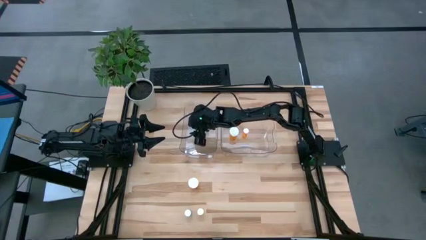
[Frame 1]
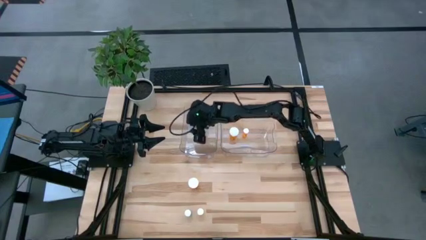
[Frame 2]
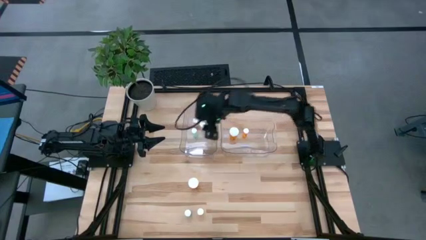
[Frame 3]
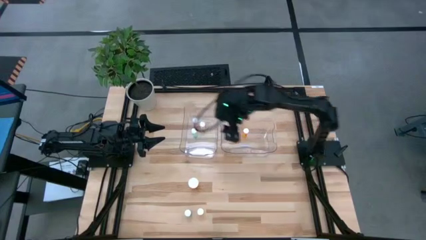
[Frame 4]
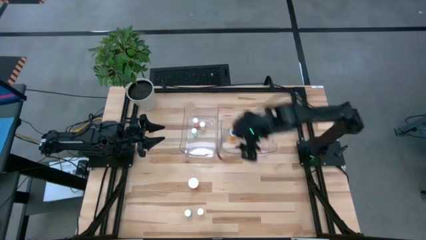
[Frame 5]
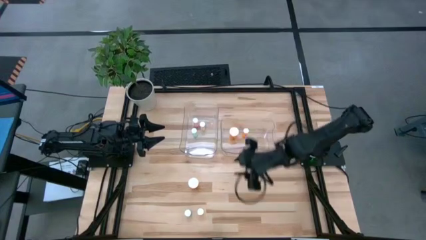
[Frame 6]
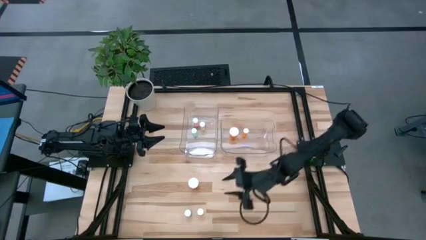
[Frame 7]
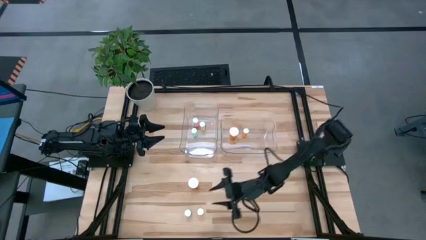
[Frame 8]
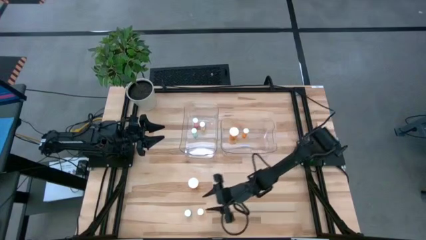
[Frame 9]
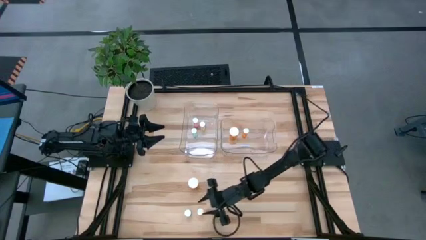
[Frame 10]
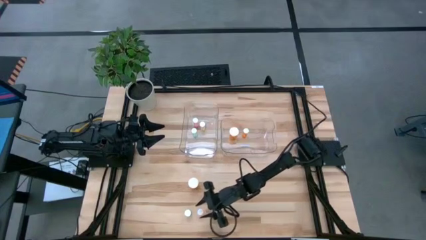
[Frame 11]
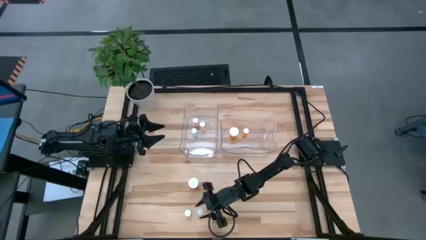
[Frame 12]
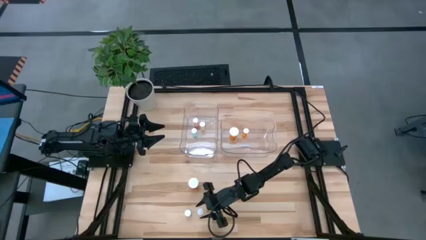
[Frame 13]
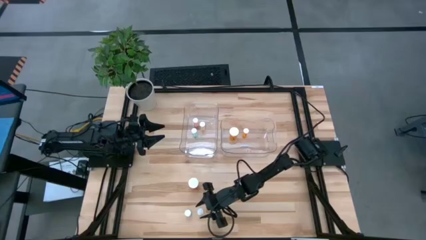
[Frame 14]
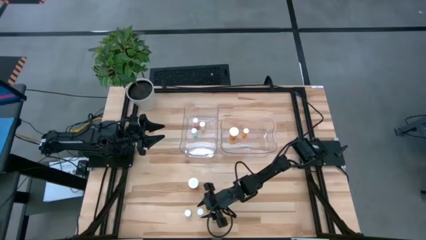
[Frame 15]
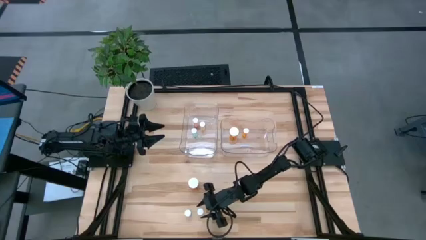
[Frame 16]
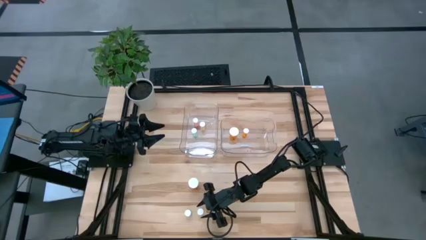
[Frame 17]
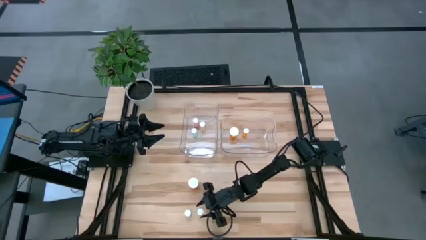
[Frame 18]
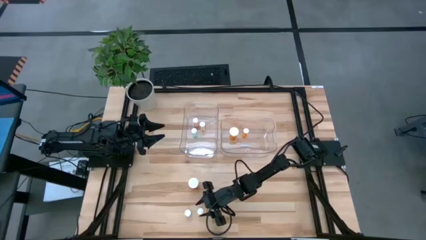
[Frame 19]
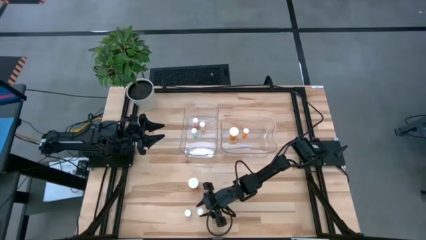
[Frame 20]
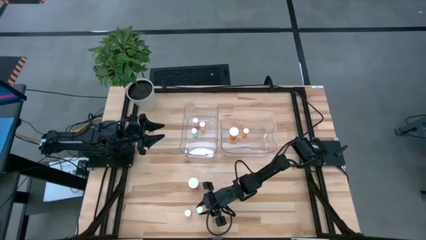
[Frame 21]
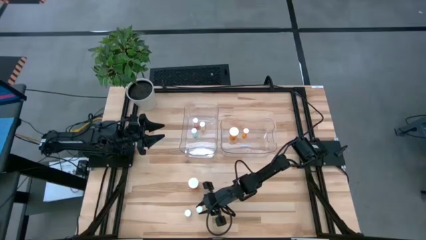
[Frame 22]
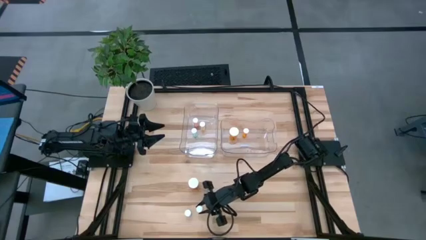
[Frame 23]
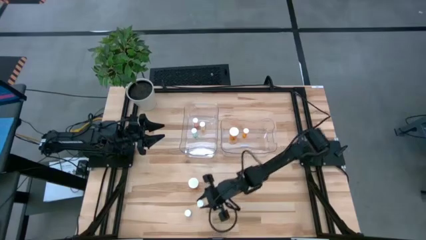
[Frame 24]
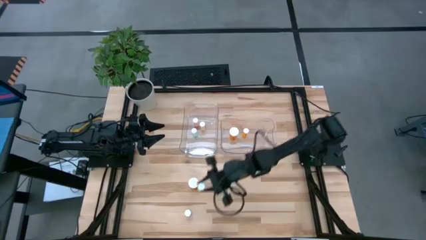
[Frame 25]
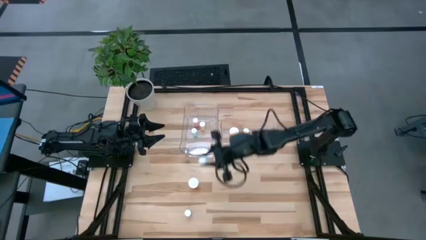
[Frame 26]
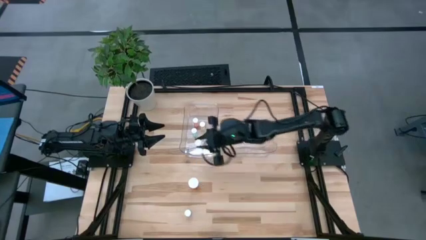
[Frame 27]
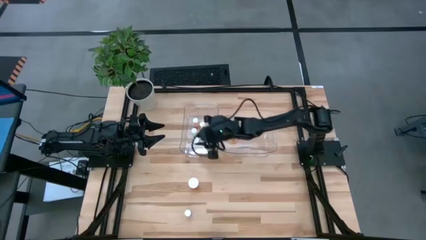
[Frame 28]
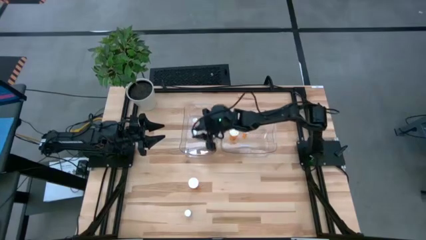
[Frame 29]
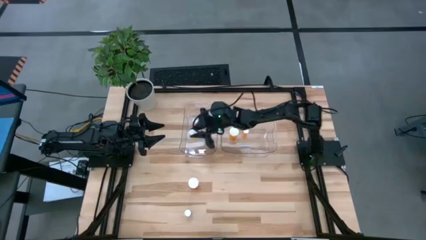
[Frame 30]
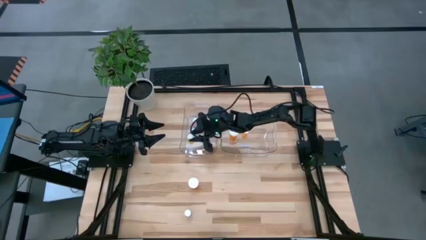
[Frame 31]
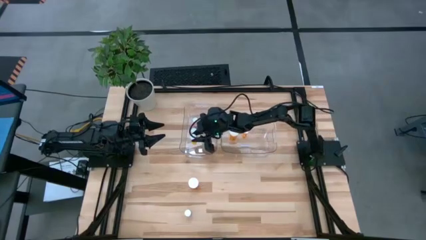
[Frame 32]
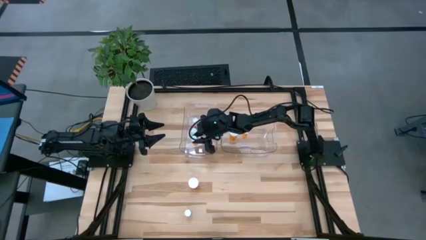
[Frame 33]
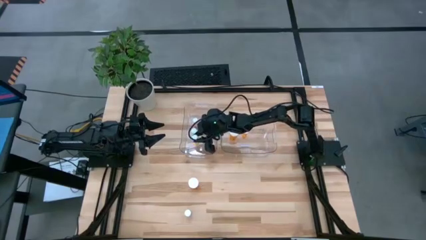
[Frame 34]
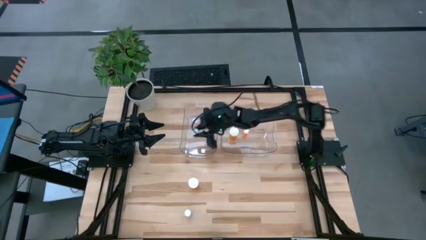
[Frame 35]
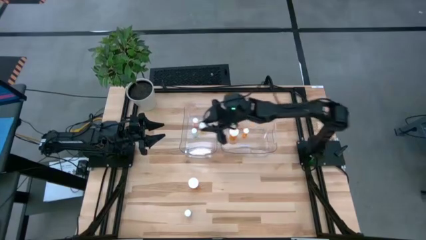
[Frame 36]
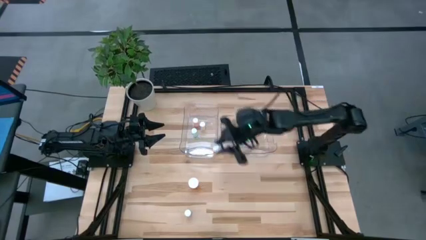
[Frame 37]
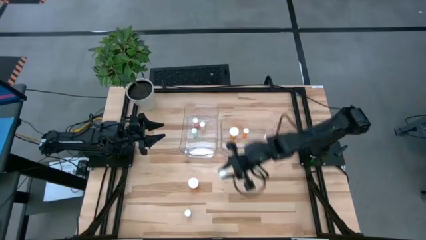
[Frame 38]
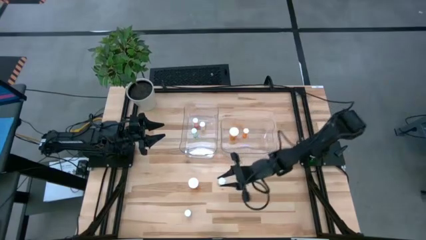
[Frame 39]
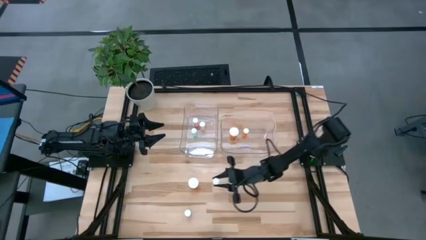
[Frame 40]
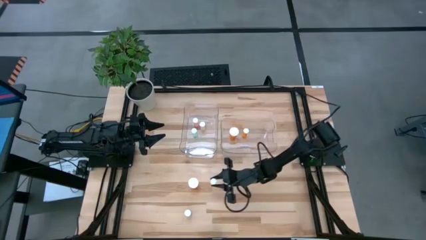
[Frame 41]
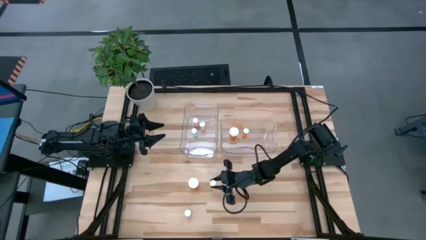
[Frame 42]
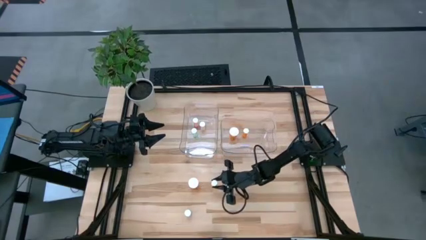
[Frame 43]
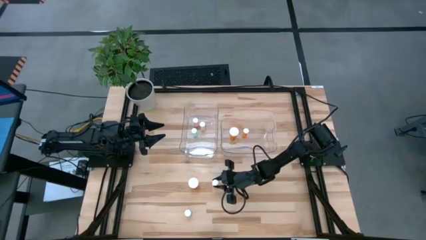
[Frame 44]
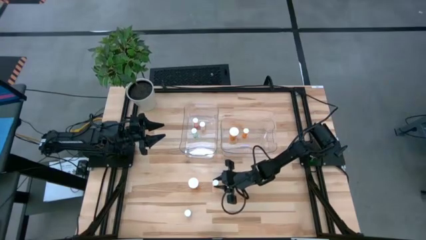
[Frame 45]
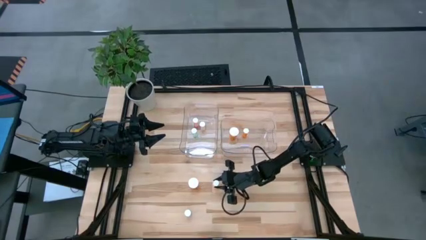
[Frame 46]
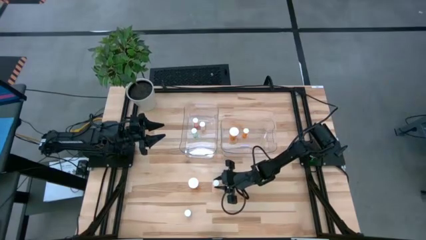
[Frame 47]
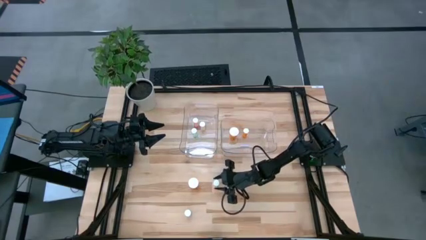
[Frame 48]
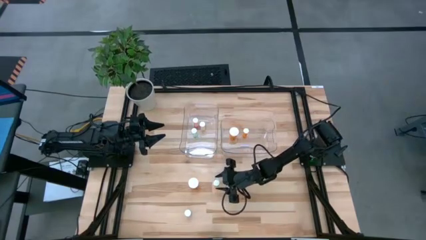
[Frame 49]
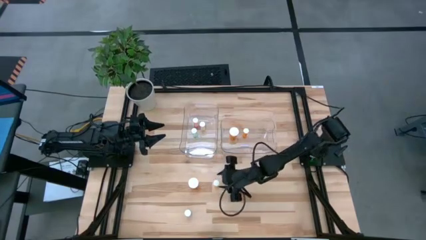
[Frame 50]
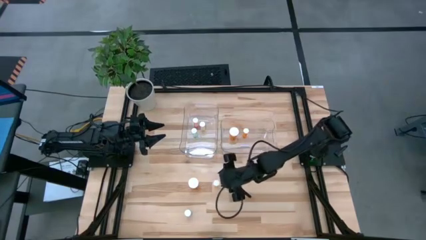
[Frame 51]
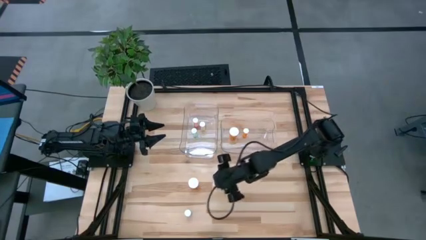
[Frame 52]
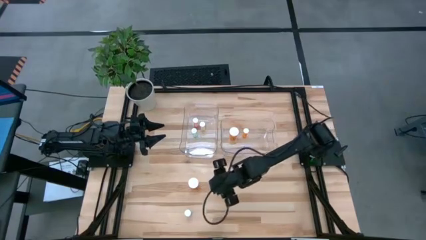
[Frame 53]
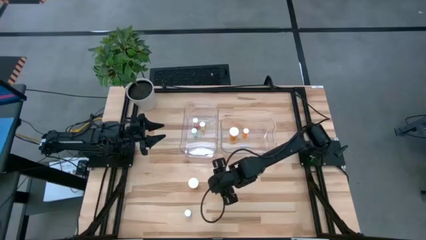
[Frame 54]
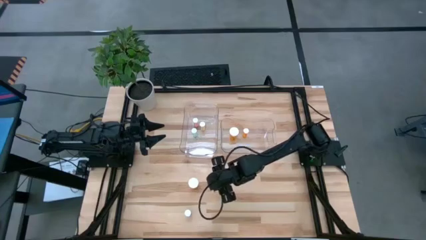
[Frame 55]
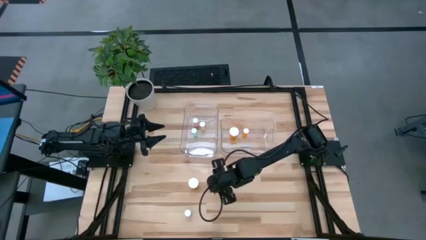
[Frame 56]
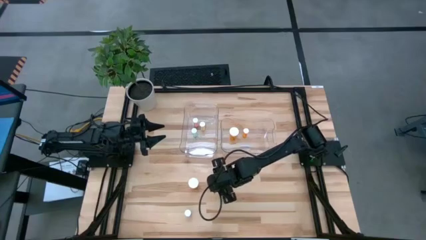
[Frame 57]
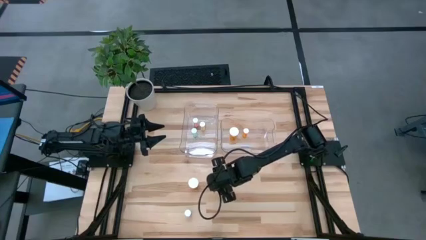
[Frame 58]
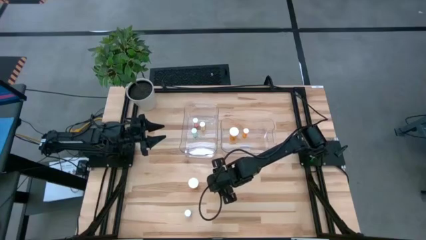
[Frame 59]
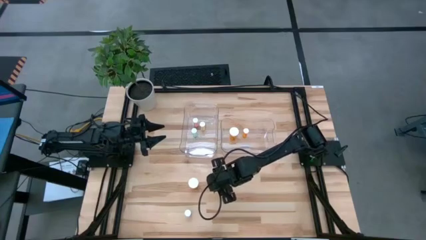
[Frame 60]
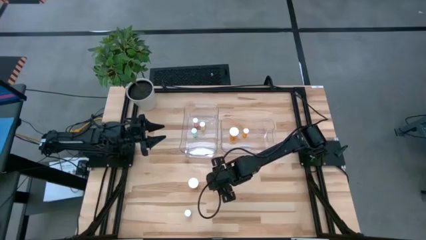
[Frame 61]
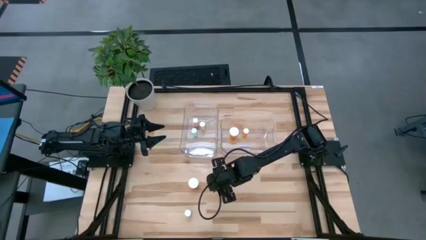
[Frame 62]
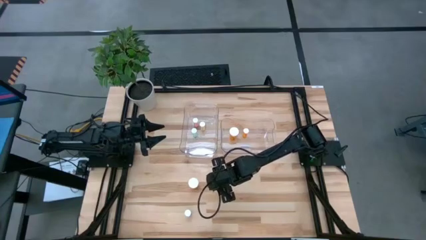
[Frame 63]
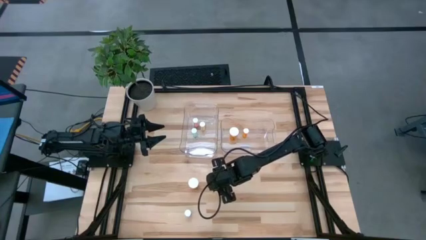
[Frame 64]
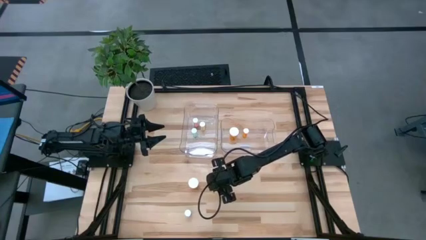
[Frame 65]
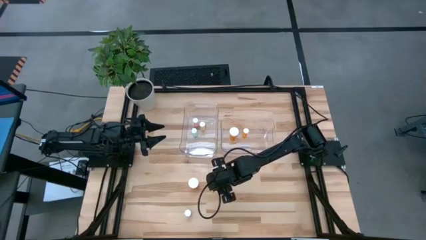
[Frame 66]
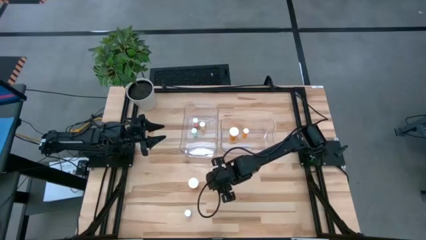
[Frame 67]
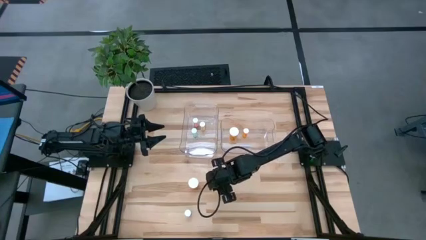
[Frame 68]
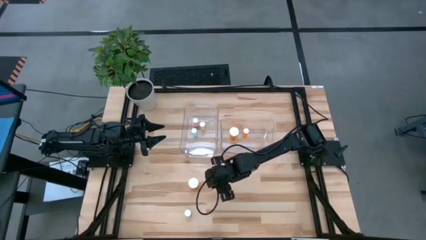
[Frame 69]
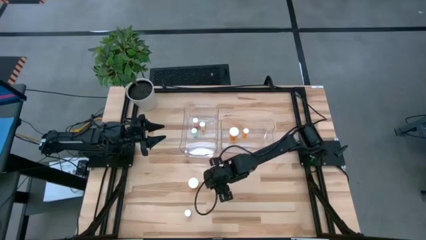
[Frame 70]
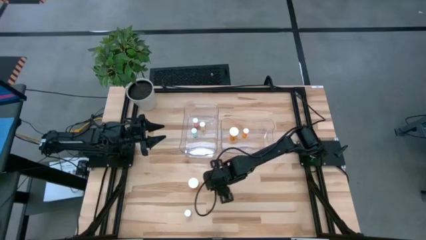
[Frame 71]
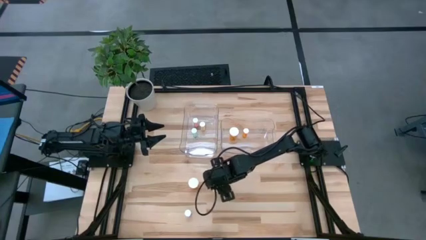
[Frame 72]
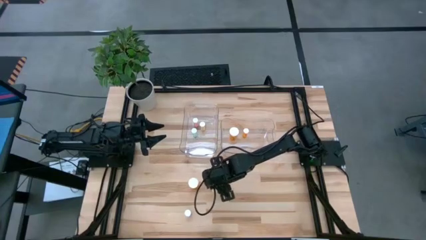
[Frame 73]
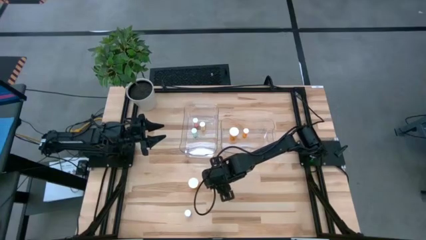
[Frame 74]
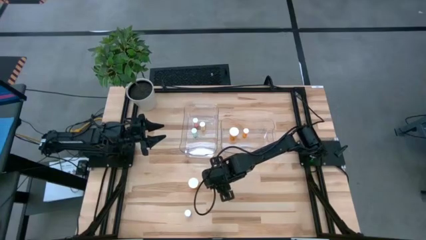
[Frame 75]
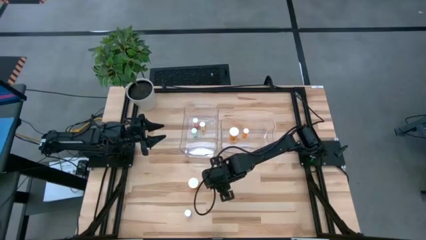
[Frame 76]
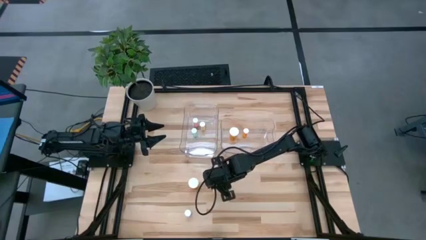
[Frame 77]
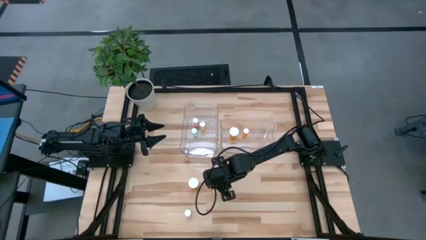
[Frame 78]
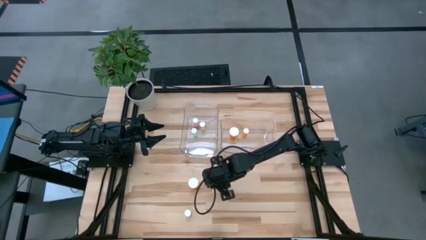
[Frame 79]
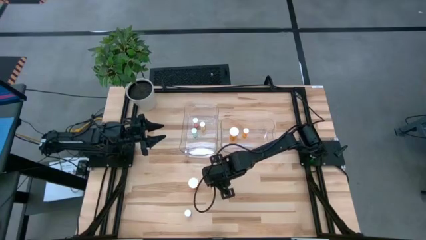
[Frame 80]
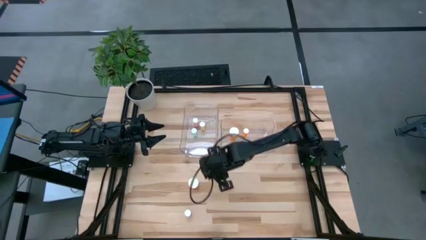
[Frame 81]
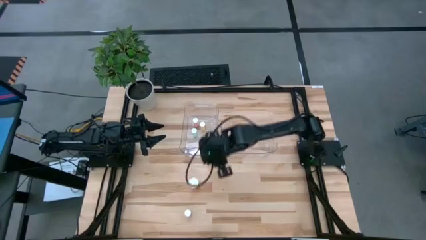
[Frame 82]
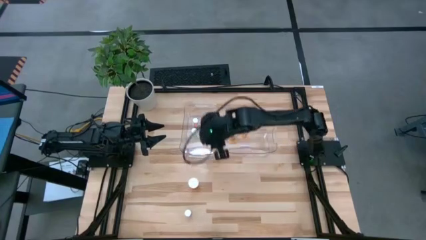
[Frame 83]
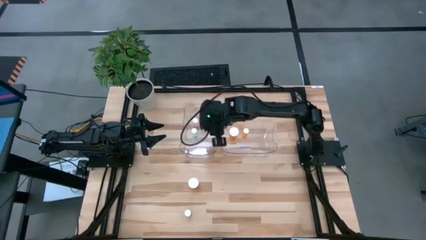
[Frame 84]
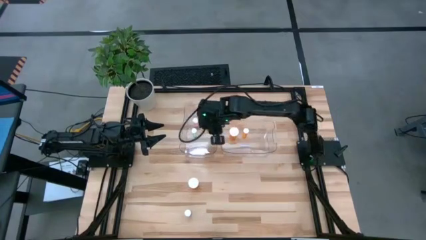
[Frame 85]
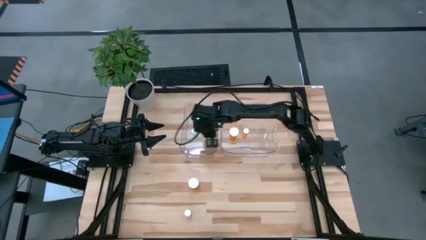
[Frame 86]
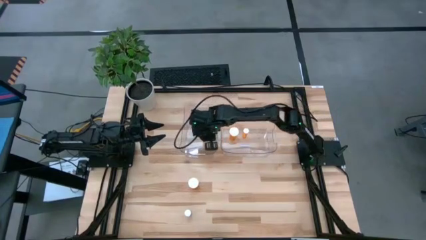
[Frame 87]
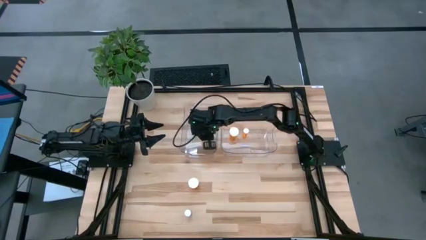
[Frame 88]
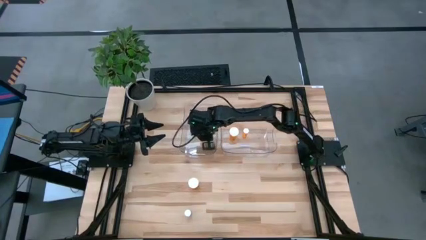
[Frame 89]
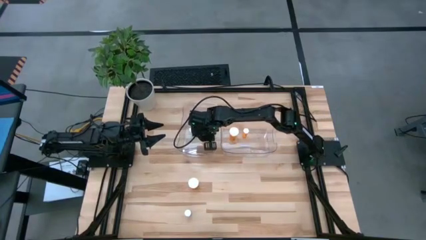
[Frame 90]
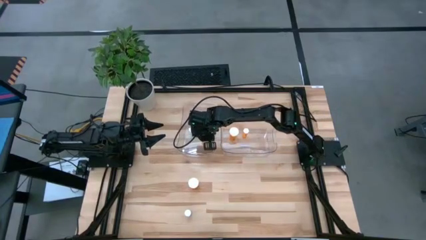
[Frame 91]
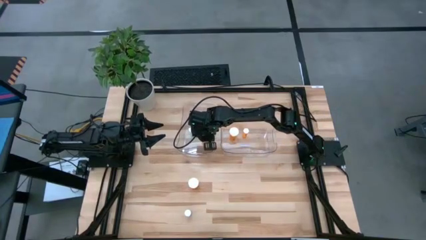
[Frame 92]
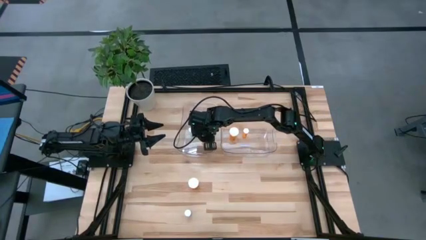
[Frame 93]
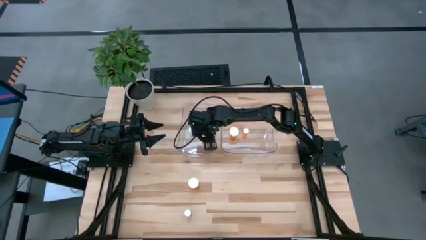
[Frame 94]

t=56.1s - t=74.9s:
Task: Pick and place medicine bottles into bin by pill shape (circle, oval)
Put the small orange pill bottle into the left transparent bin
